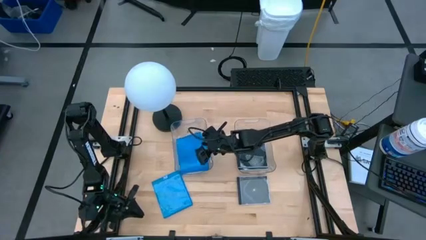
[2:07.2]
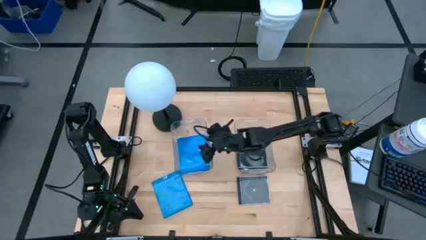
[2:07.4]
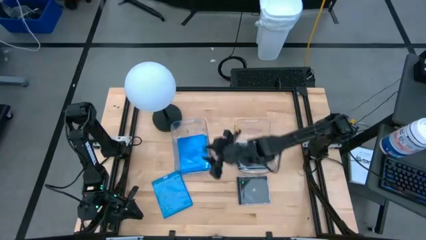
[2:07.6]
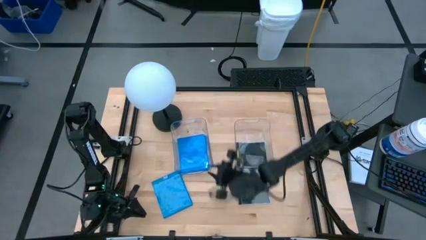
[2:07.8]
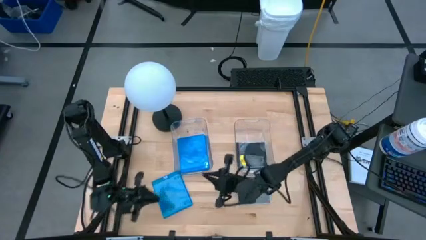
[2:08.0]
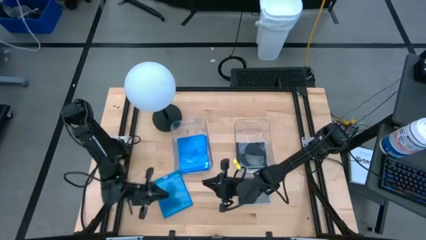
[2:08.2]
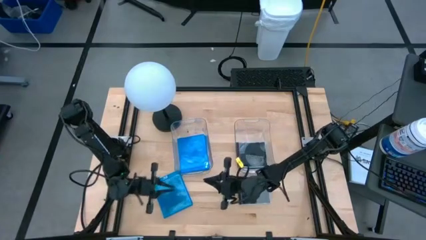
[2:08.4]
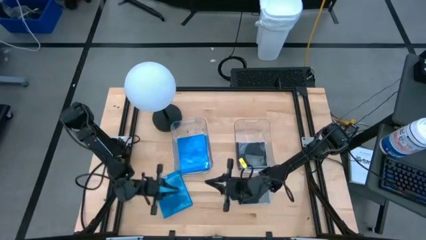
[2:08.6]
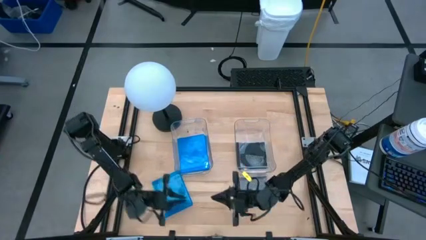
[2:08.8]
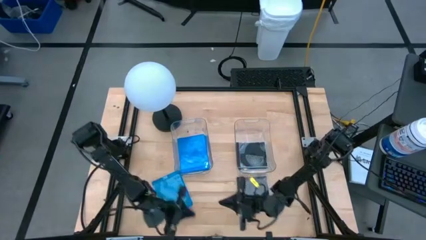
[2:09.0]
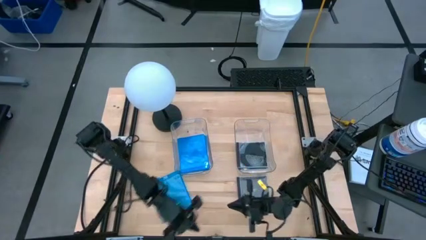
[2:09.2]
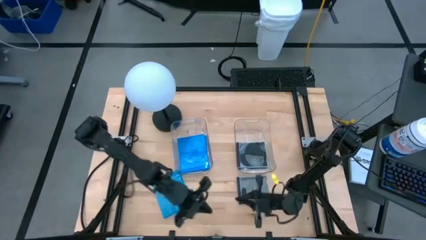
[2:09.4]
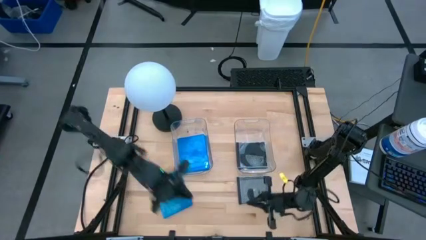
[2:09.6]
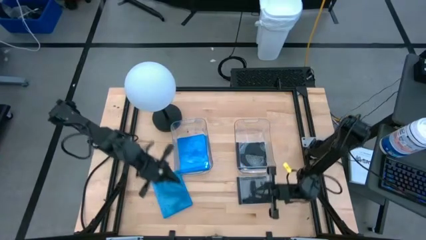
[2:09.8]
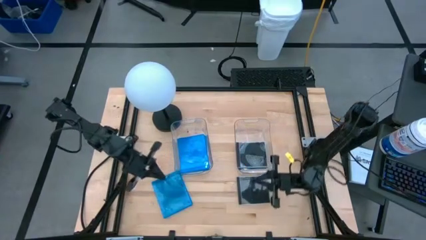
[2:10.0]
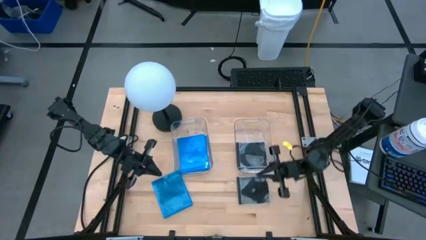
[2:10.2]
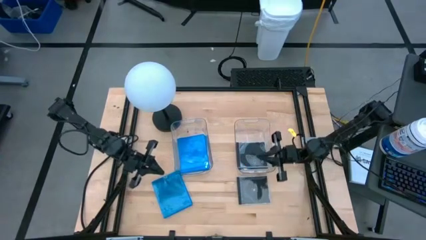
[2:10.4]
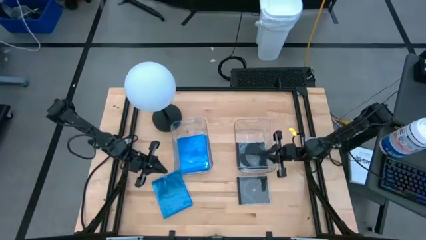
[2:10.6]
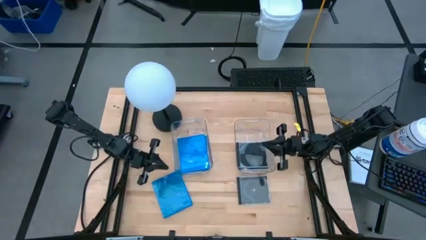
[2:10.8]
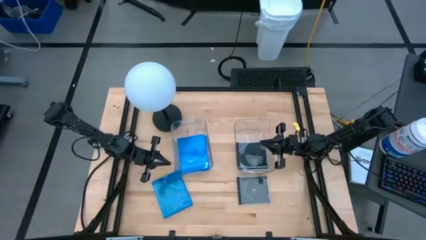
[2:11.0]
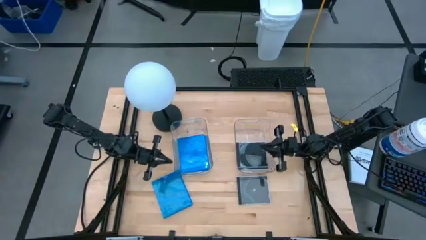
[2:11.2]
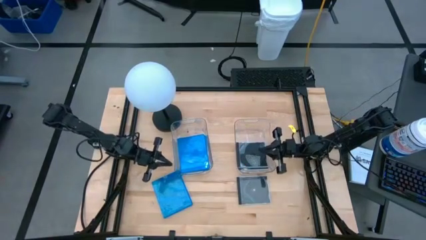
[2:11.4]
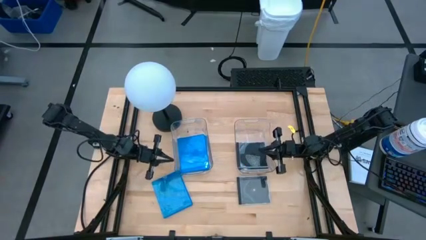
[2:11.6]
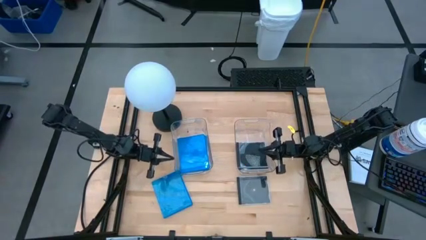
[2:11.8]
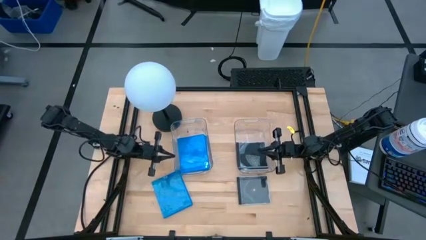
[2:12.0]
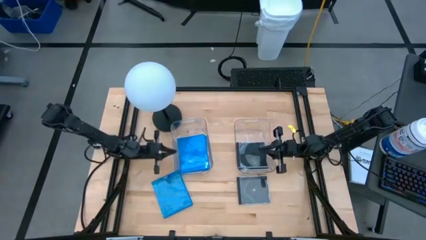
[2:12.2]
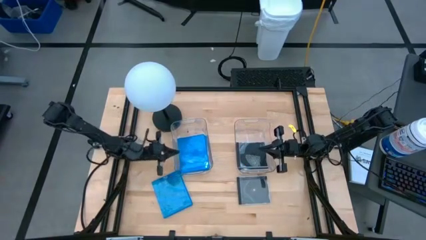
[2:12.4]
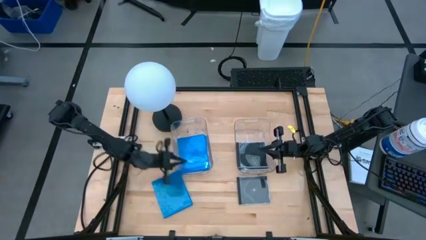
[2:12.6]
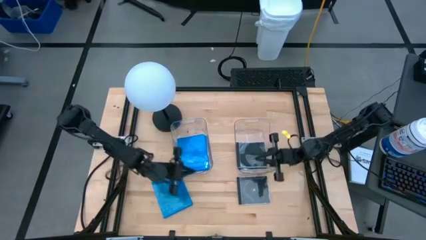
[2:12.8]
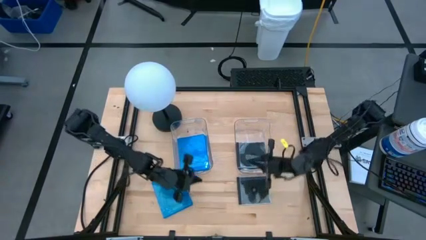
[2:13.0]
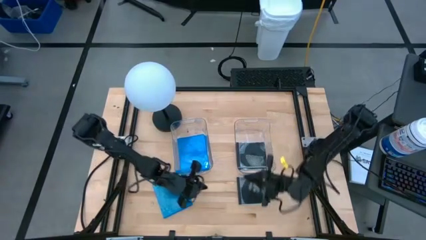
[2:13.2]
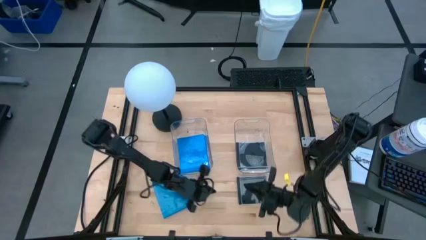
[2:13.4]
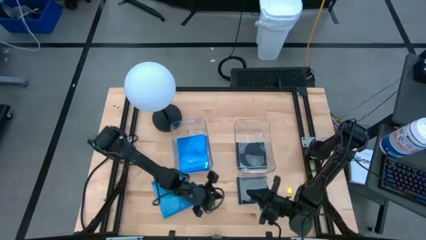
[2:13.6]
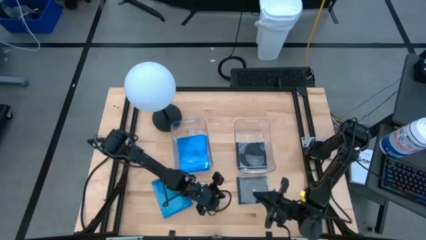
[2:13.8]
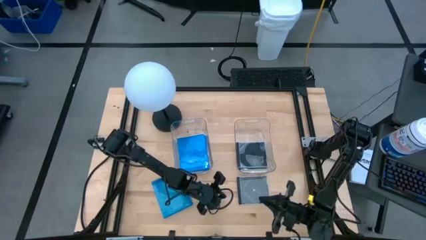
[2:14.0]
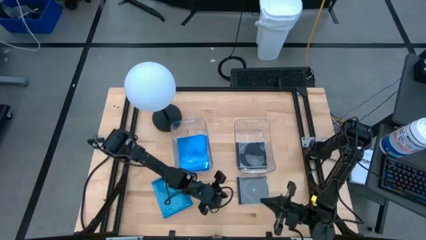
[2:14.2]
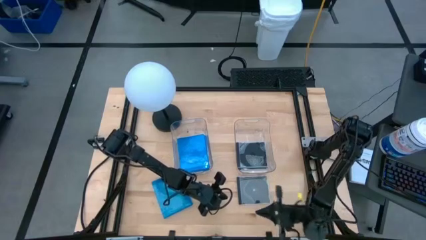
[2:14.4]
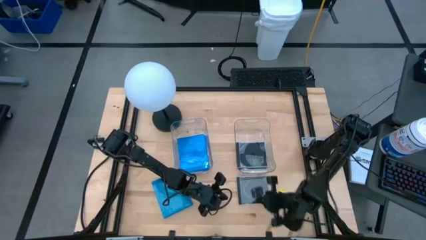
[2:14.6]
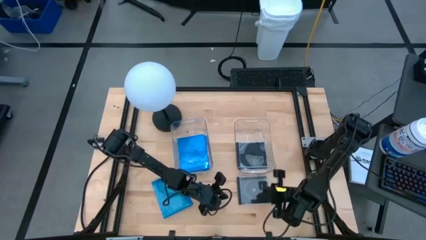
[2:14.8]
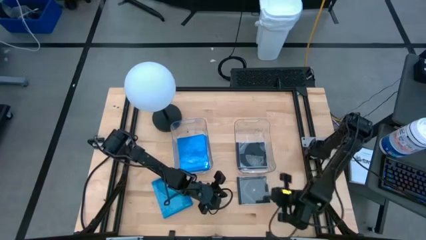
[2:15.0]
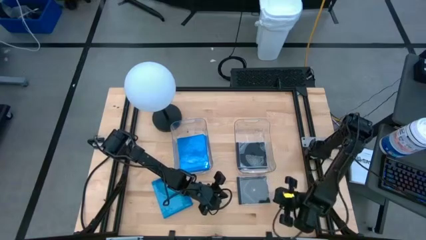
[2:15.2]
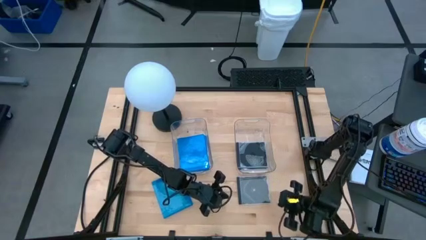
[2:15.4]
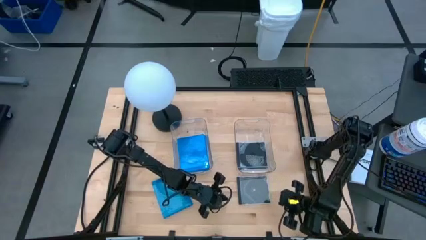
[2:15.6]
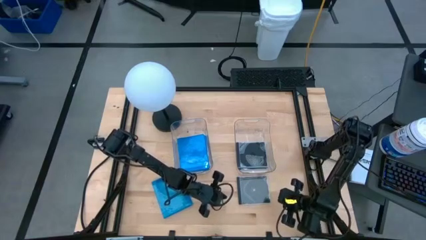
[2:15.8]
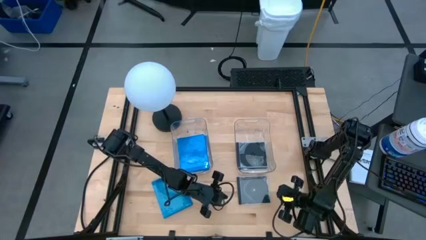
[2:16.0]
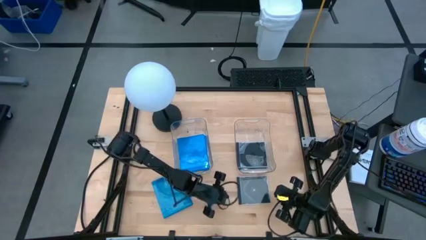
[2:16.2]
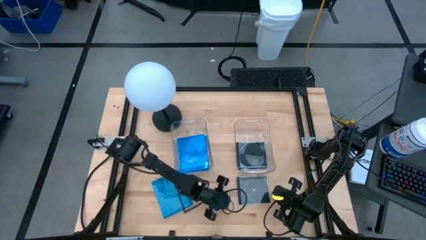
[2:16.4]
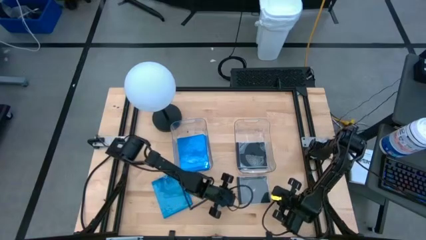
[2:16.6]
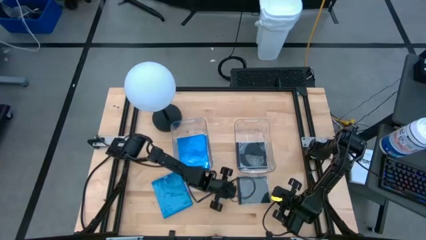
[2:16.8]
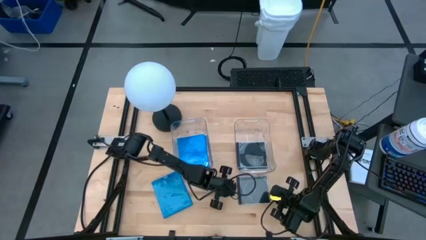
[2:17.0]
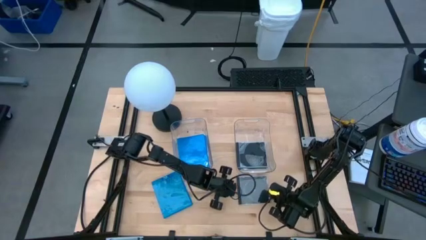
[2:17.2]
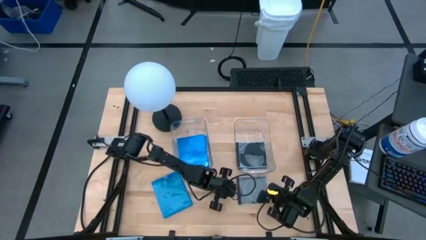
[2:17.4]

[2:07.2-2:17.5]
Task: Pick & place jewel cases by type
Put the black CD case into the right transparent bin

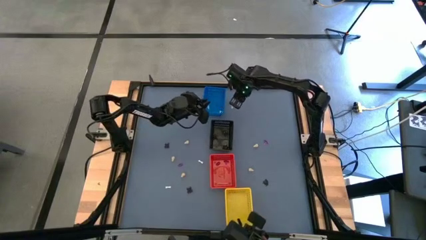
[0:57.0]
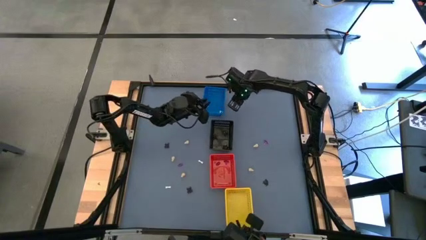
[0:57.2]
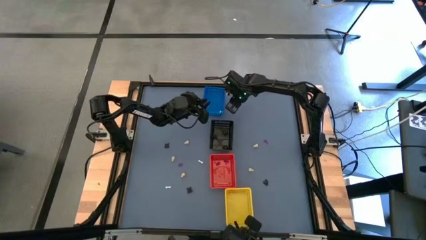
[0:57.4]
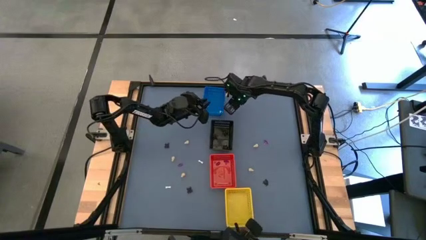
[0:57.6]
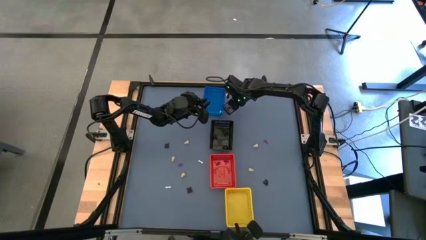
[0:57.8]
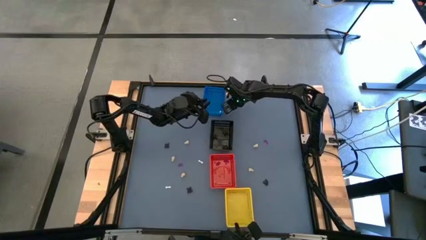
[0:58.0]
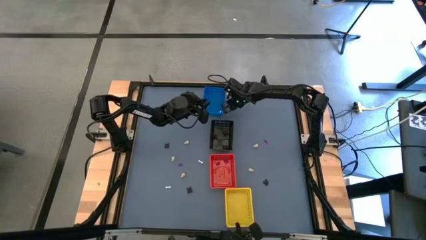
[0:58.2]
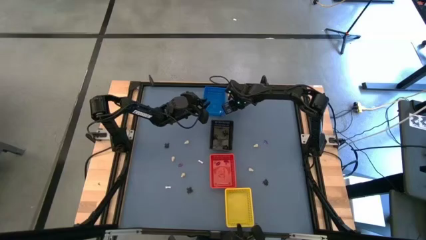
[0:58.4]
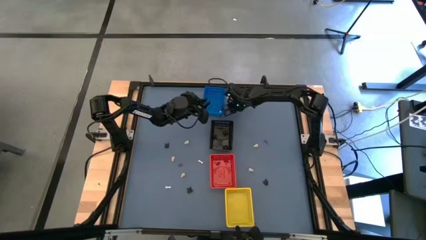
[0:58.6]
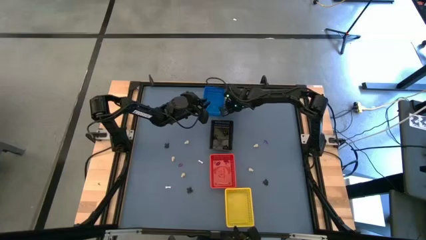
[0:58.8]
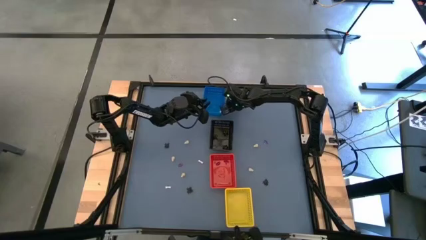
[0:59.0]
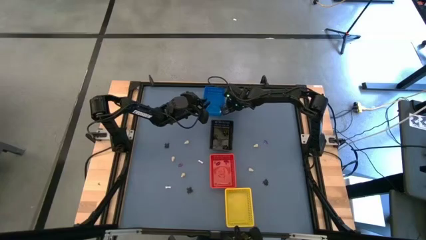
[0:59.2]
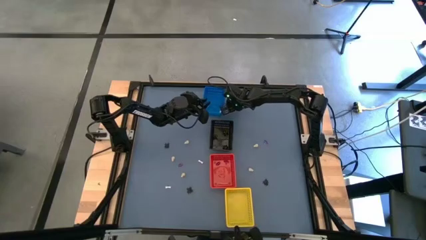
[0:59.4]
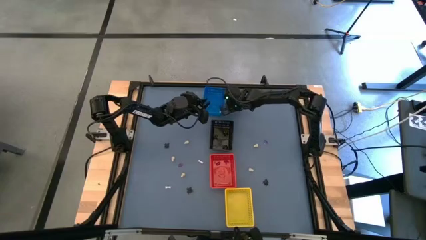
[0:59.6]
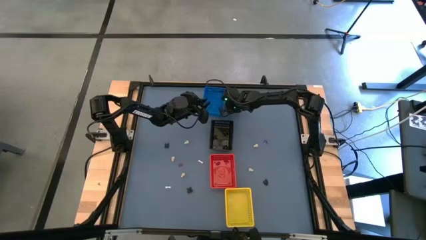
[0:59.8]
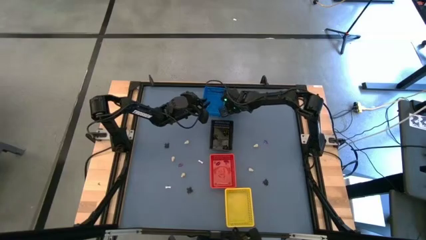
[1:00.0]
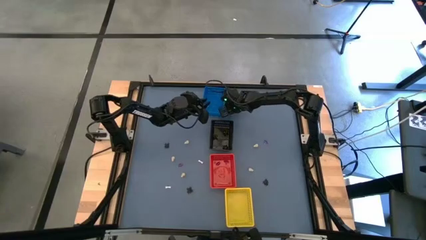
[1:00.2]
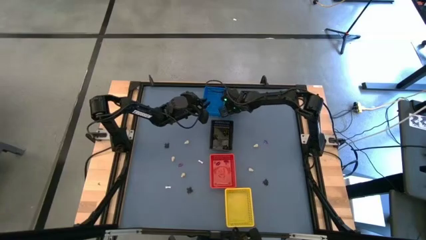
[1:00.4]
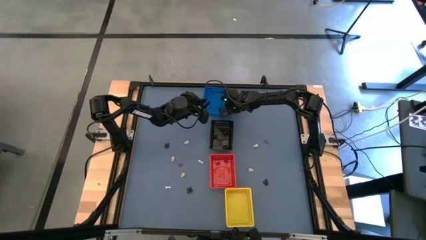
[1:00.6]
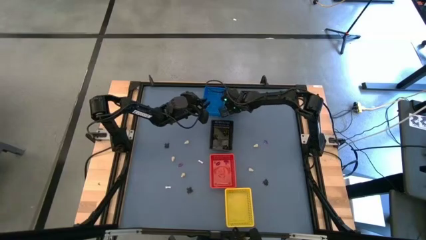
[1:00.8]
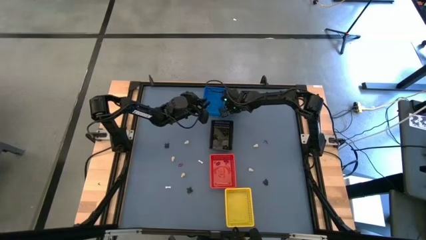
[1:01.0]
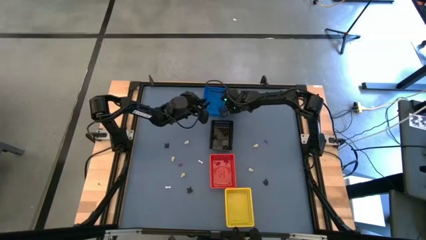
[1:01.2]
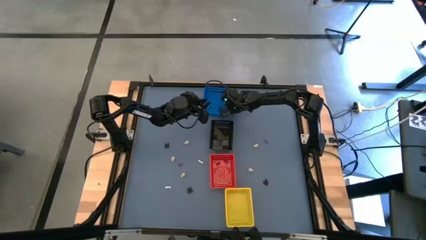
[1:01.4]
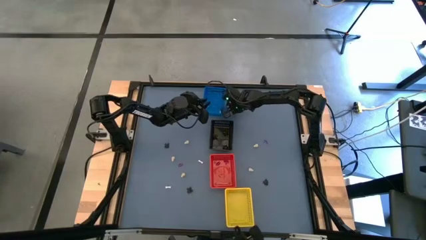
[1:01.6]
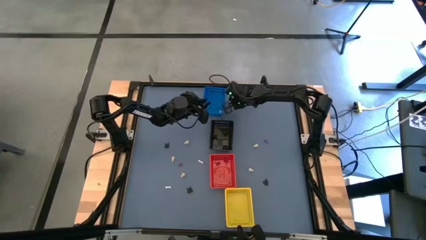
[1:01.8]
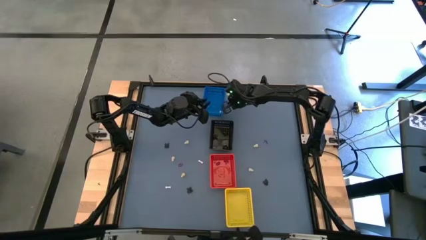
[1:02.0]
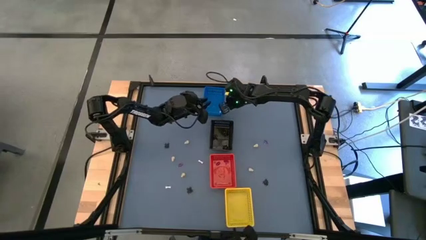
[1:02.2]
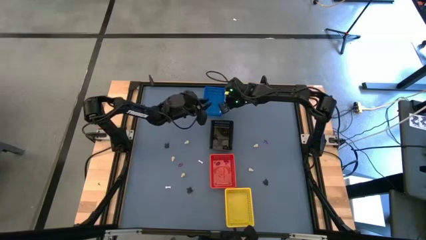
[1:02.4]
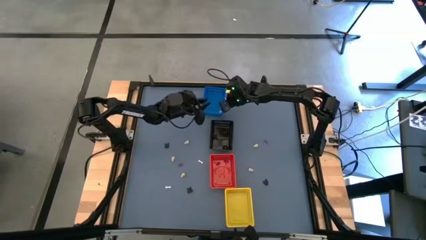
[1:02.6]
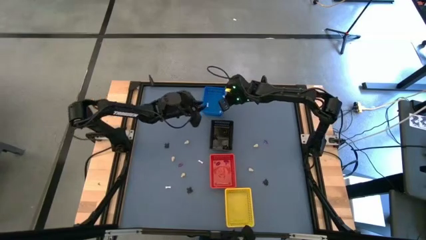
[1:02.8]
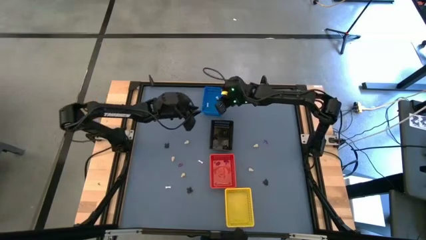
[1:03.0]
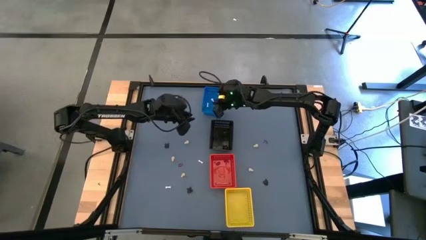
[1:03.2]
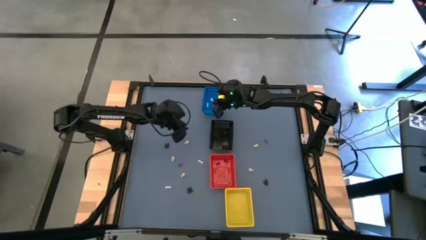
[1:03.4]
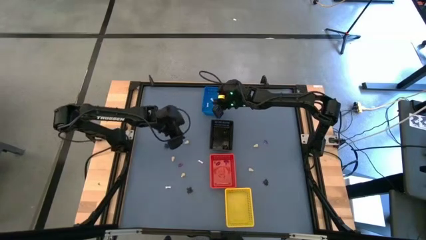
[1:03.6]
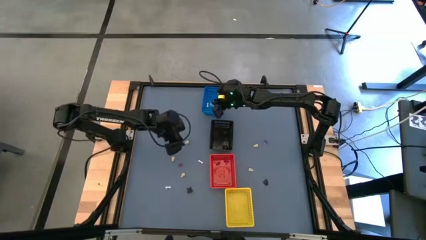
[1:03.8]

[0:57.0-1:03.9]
Task: Sort Halloween decoration
Put the white bone toy into the blue bin
